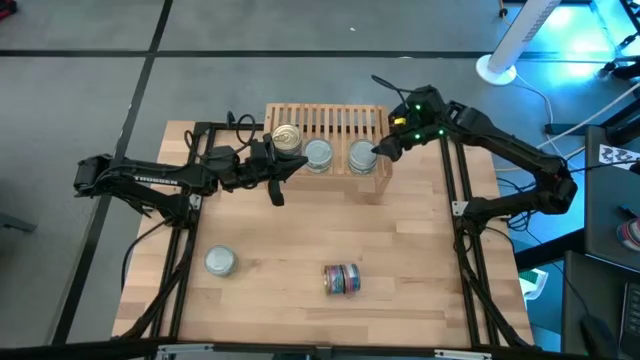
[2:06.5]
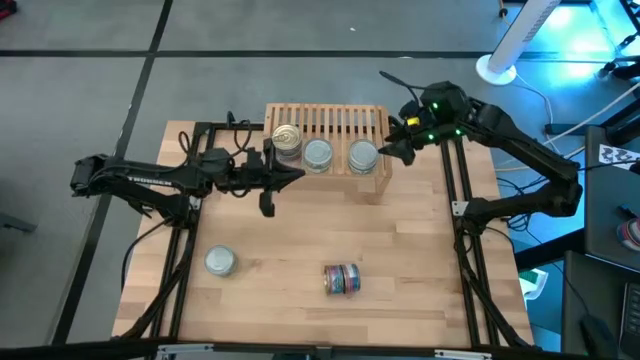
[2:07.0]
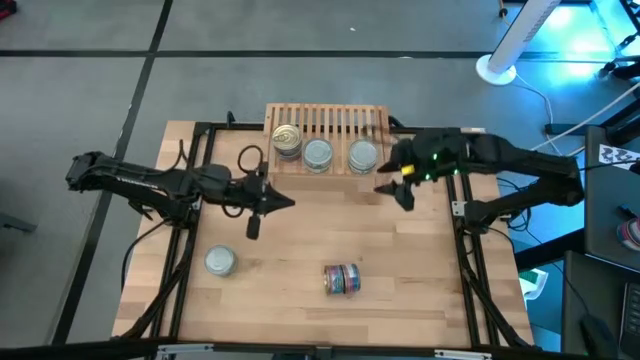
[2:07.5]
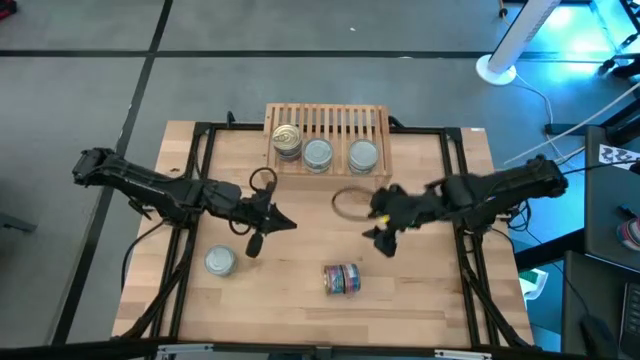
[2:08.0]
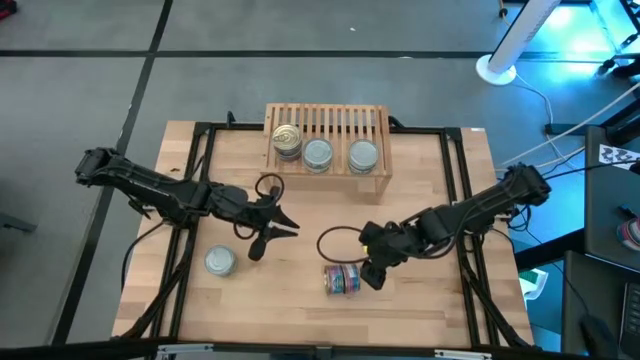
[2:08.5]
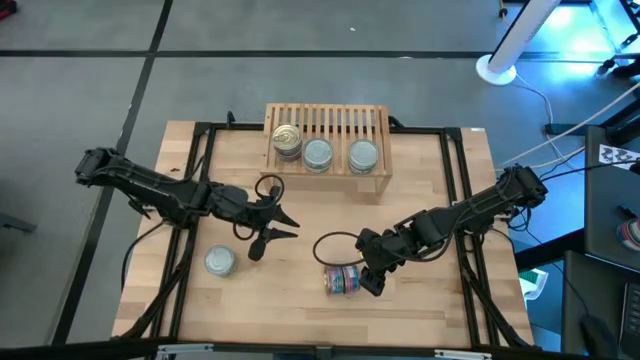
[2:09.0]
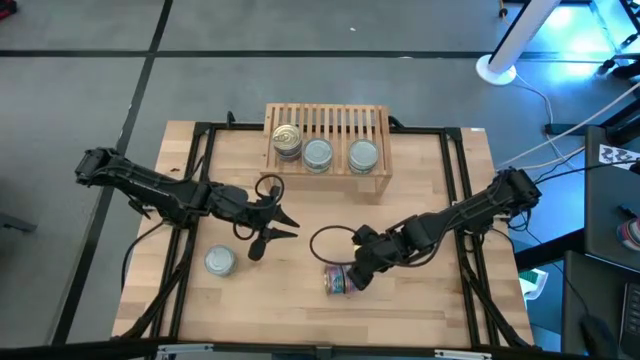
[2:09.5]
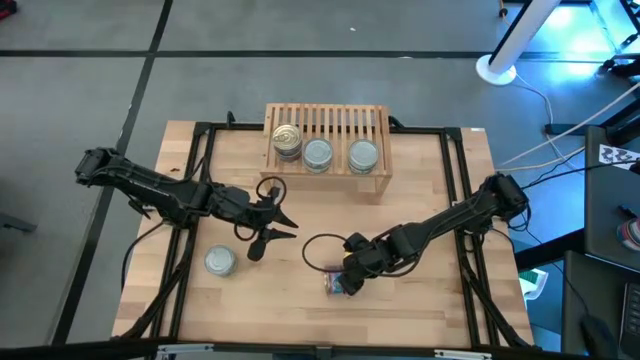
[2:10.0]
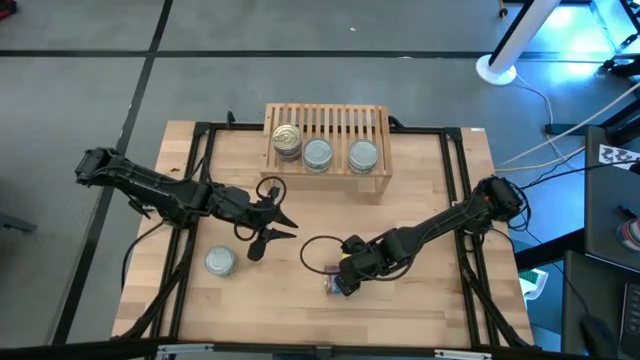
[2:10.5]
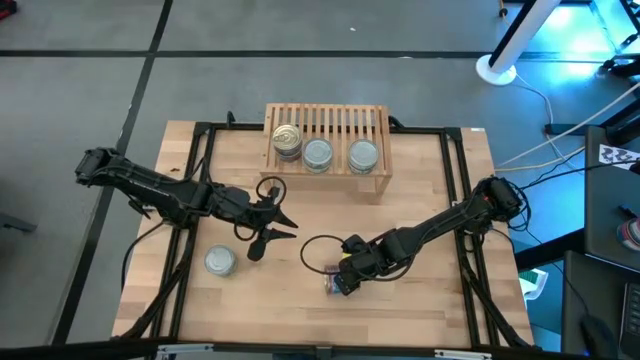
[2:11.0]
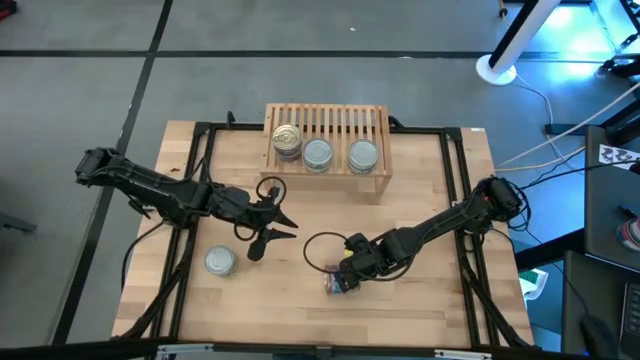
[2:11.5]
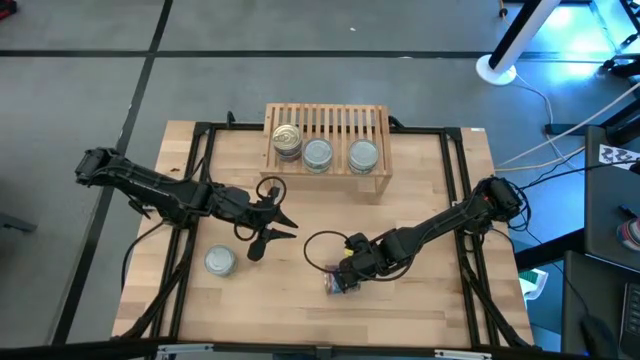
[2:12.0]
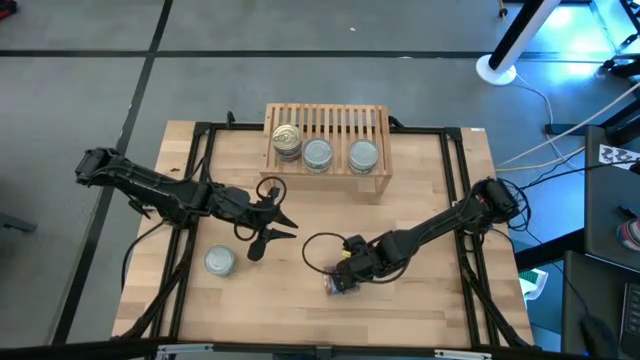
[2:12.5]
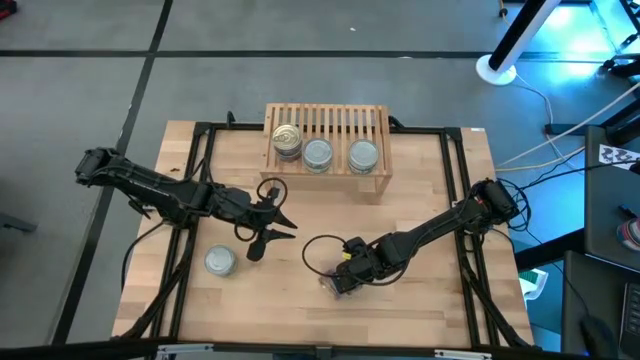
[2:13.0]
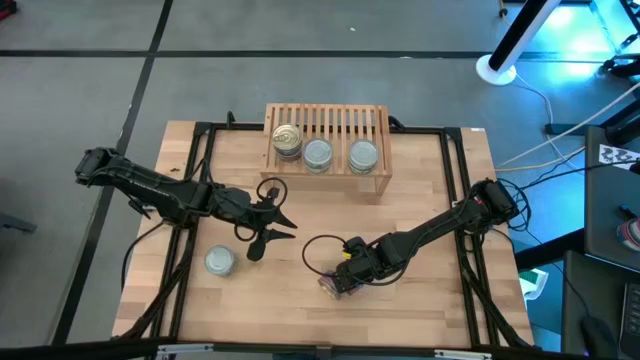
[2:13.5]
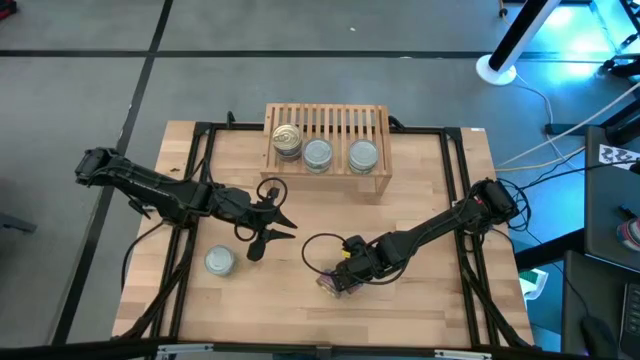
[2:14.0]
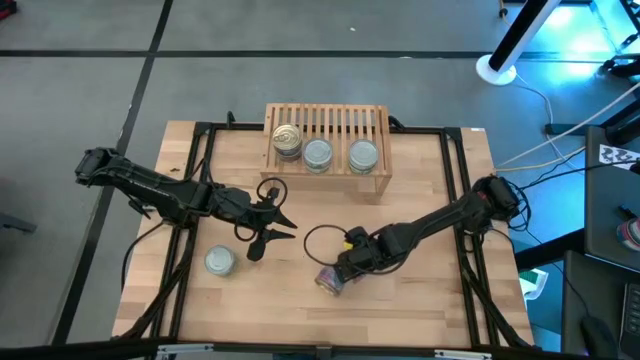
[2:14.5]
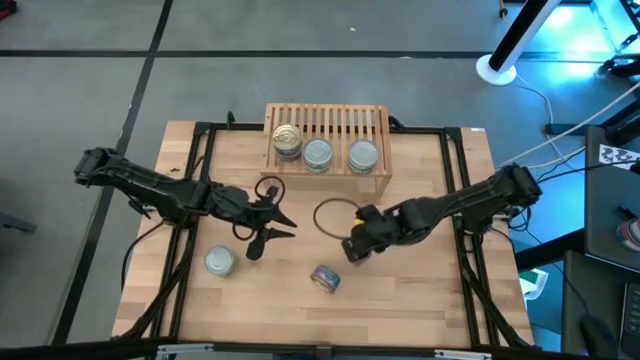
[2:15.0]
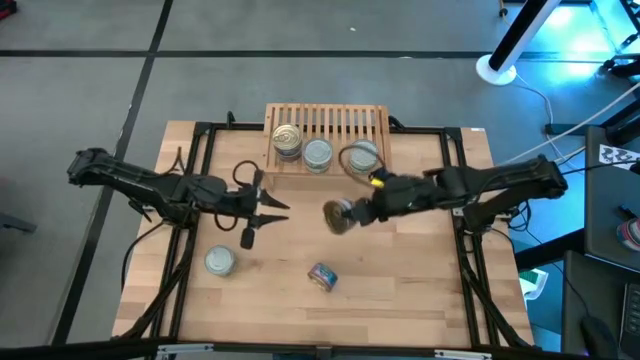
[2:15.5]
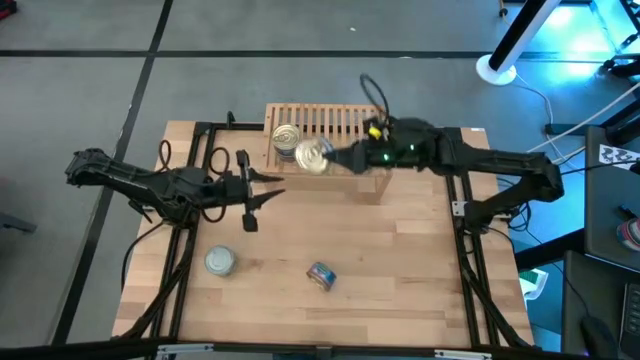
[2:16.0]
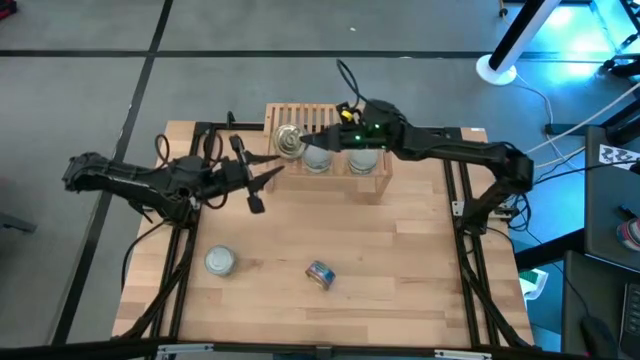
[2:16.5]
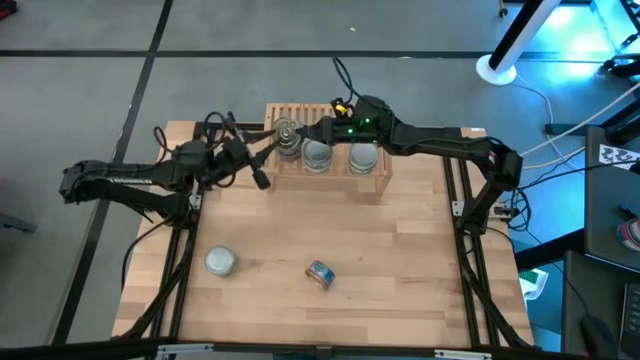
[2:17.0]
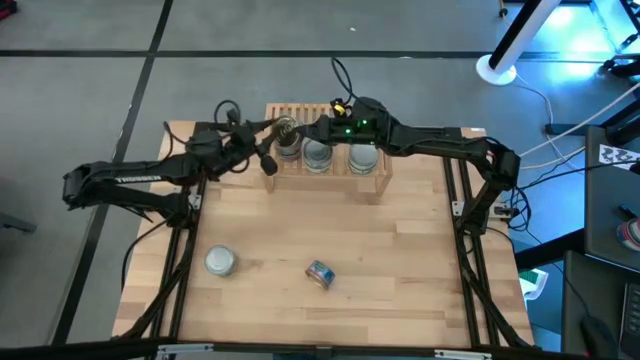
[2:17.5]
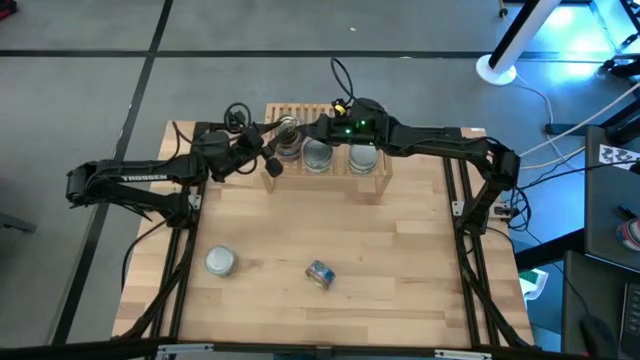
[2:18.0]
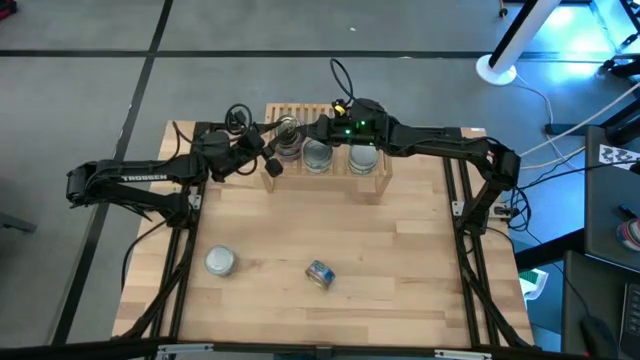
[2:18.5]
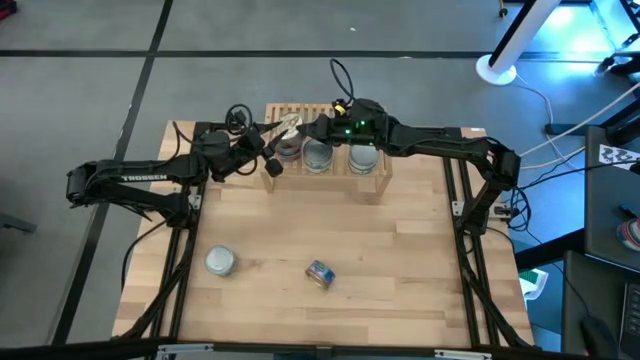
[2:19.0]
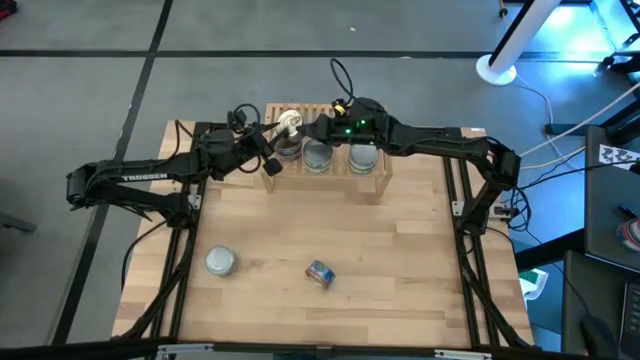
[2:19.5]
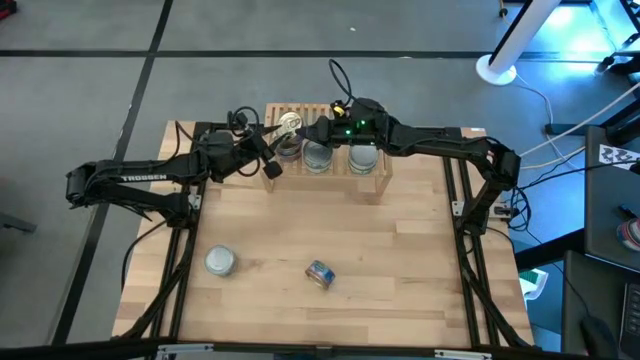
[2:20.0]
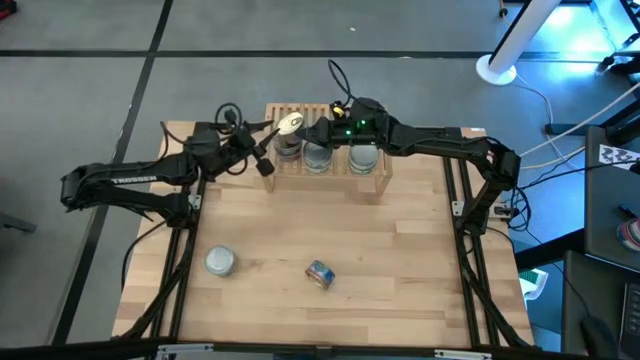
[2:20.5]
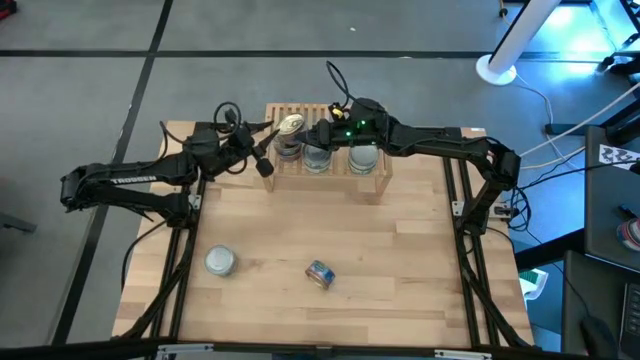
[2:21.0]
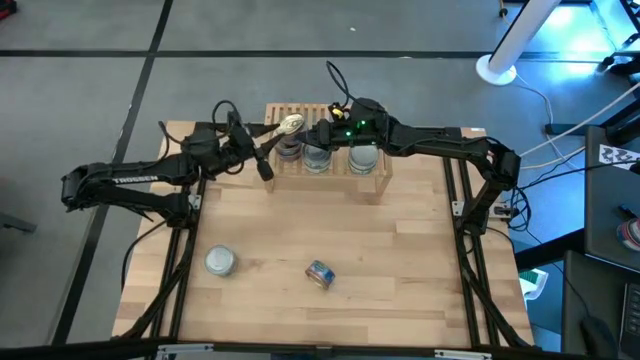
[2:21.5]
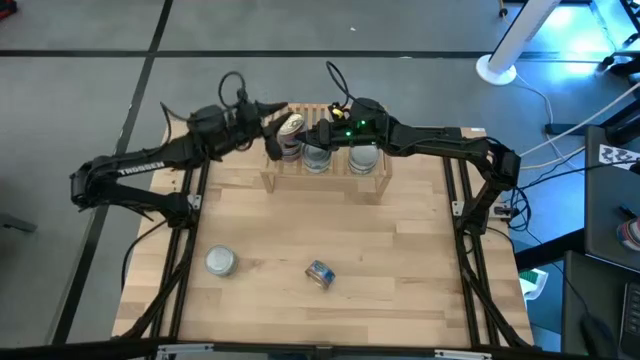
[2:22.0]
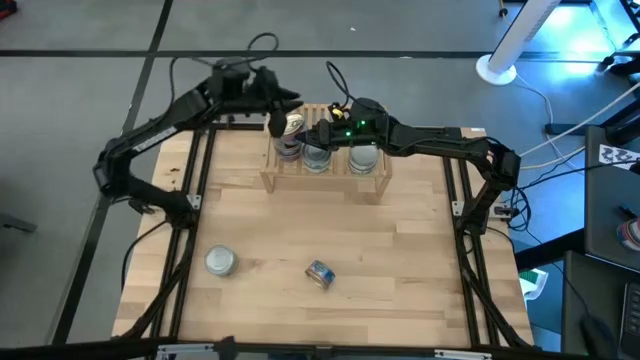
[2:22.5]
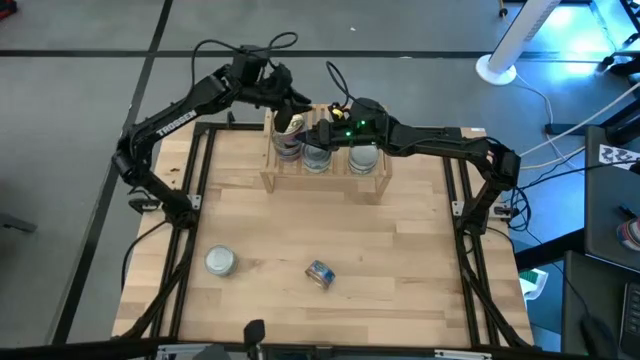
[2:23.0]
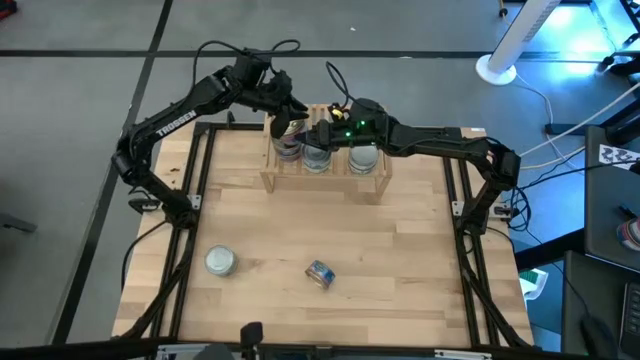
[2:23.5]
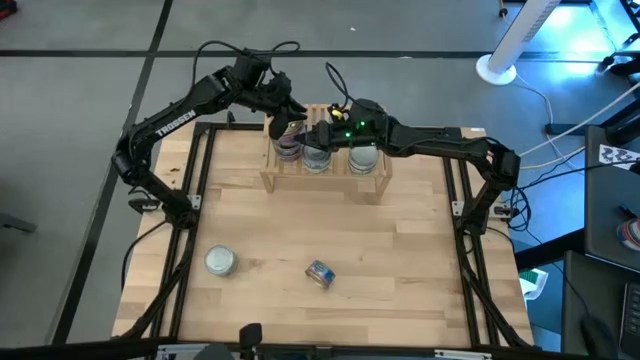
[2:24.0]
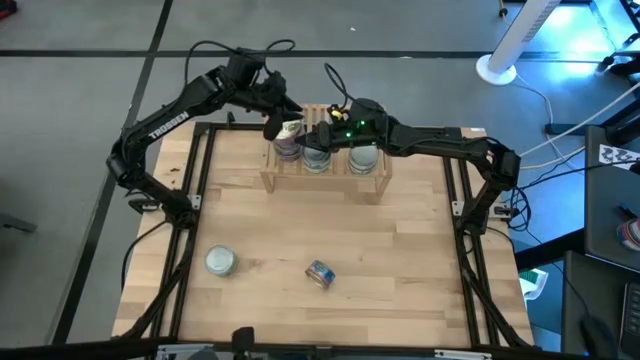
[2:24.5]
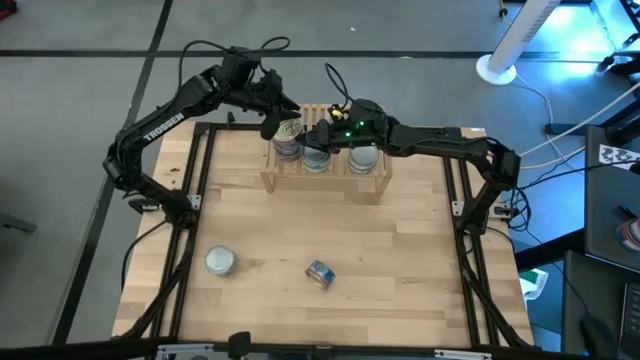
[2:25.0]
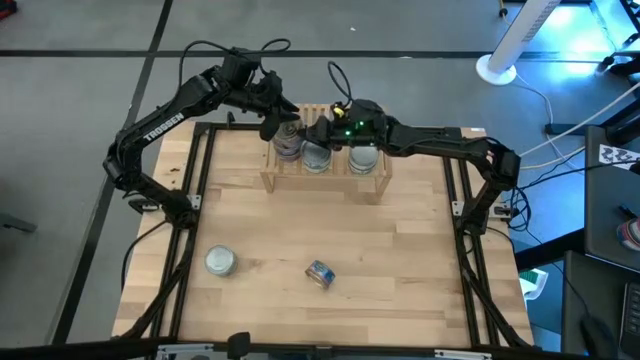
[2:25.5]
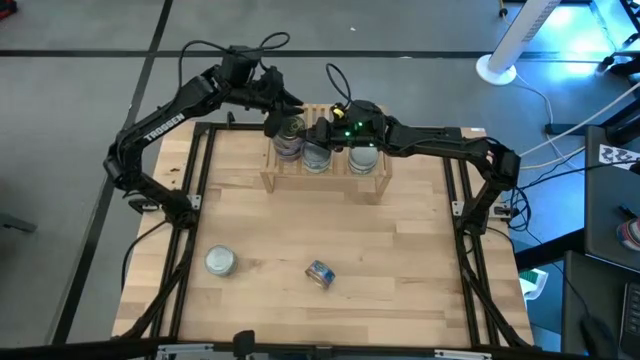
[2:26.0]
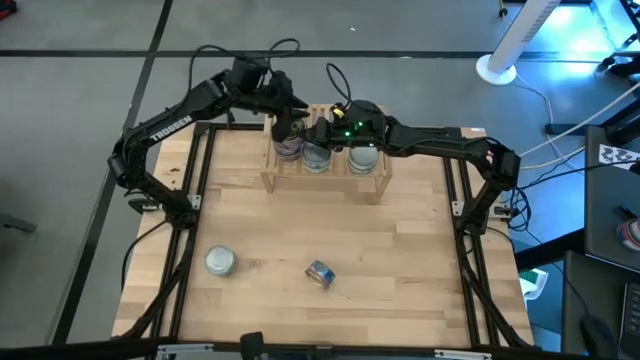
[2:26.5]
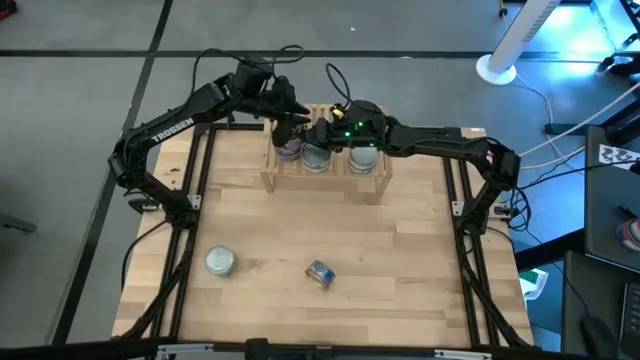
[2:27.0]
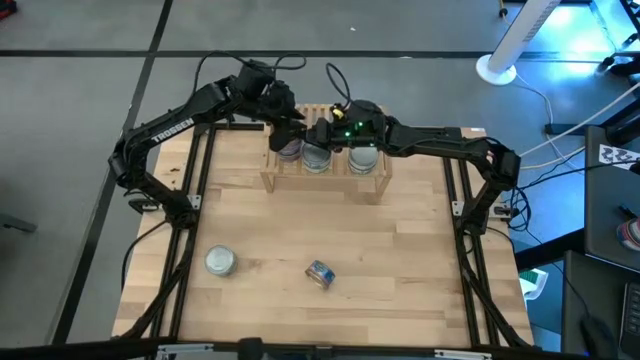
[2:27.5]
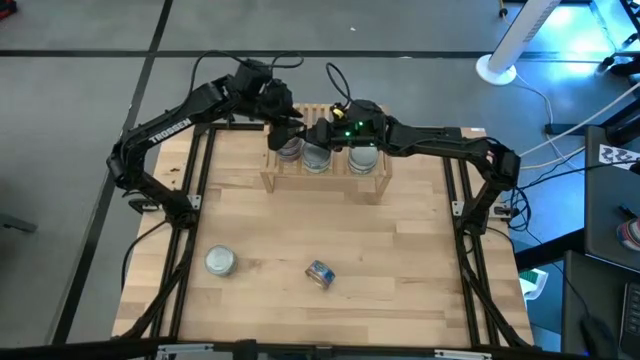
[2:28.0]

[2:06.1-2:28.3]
Task: Stack canned seafood by type on shelf
Stack the blue-pink tuna can on top of the other blue-pink tuna can on the shelf
